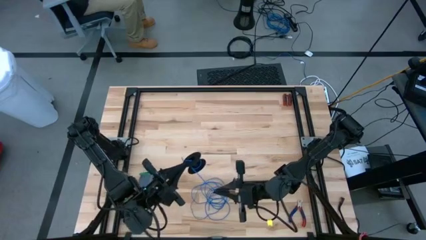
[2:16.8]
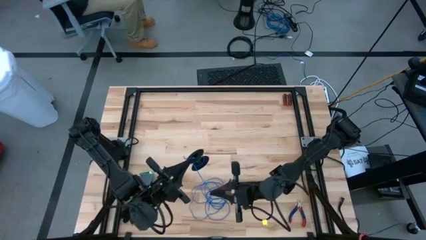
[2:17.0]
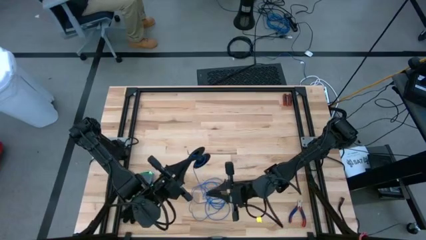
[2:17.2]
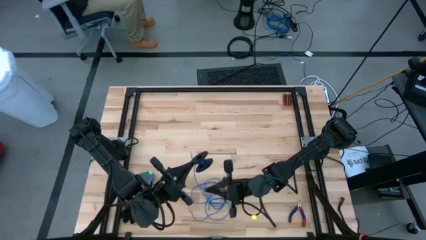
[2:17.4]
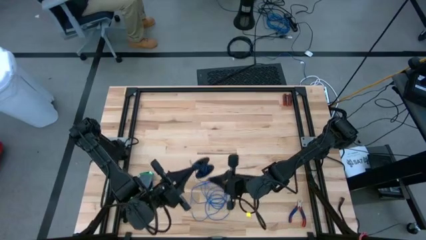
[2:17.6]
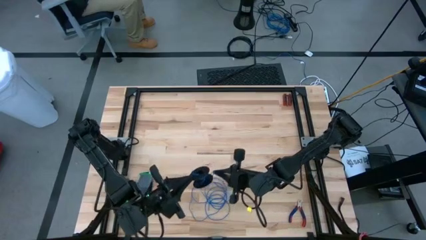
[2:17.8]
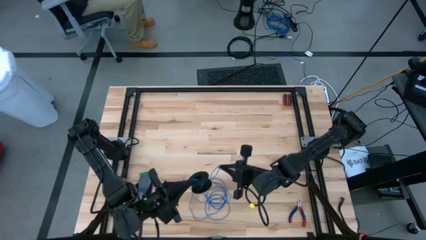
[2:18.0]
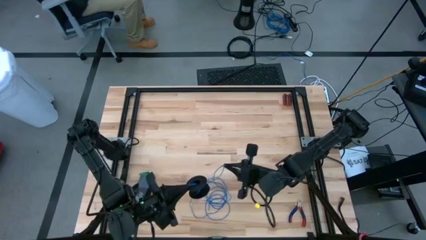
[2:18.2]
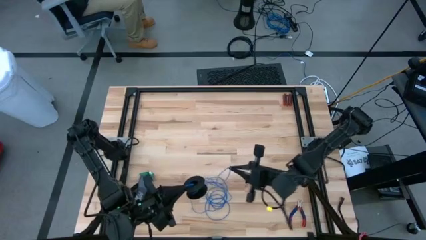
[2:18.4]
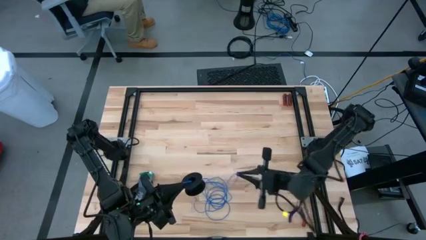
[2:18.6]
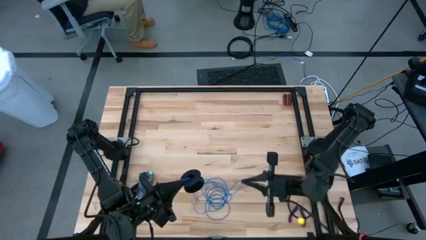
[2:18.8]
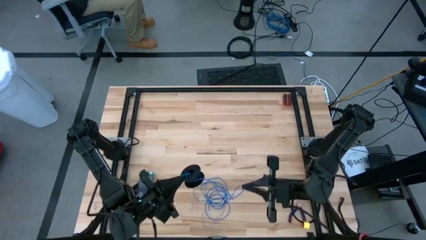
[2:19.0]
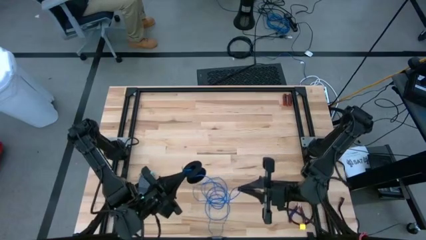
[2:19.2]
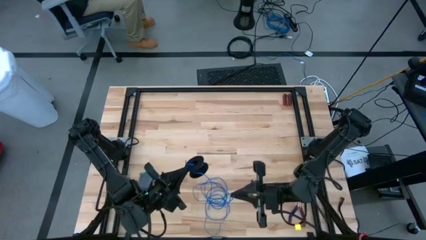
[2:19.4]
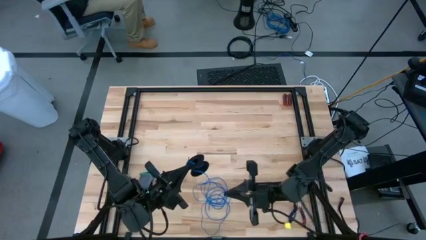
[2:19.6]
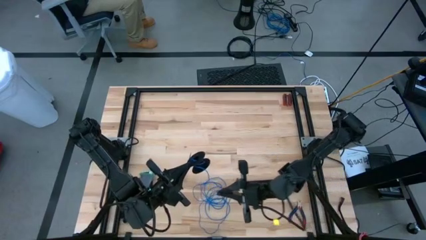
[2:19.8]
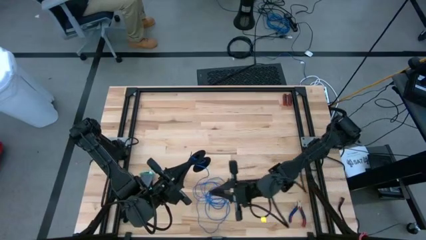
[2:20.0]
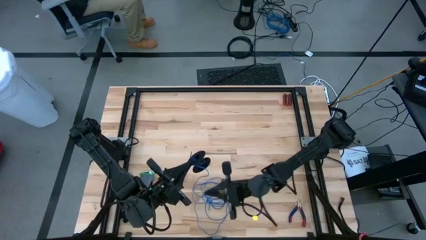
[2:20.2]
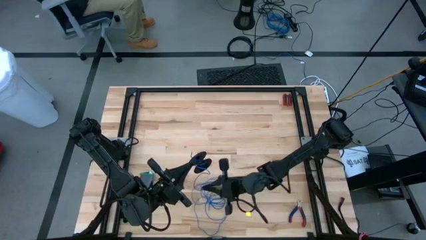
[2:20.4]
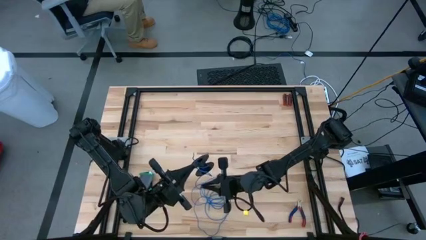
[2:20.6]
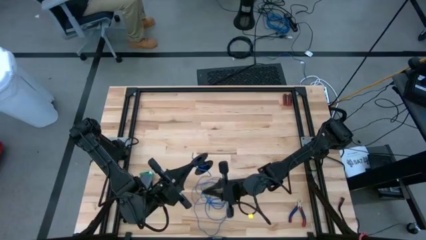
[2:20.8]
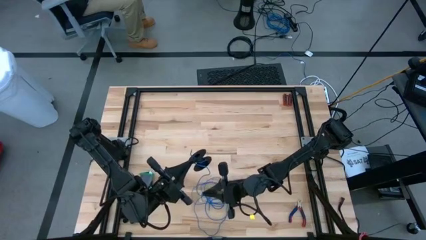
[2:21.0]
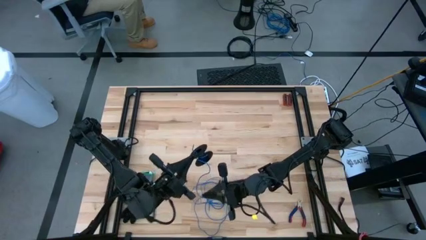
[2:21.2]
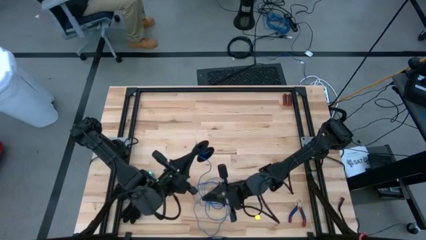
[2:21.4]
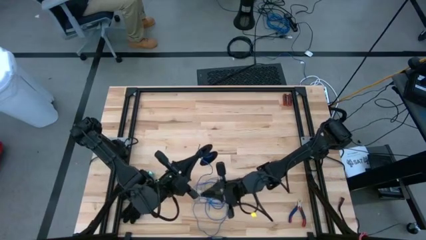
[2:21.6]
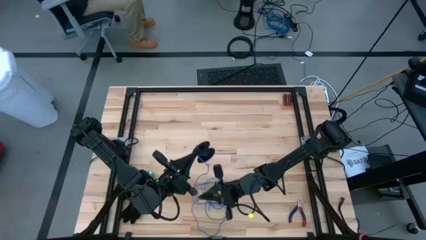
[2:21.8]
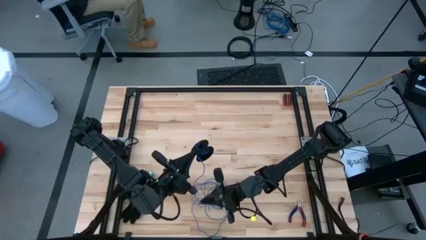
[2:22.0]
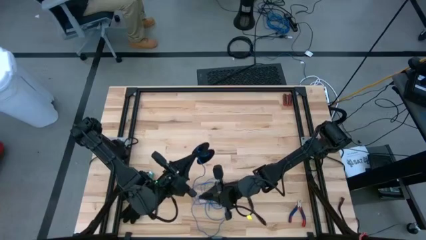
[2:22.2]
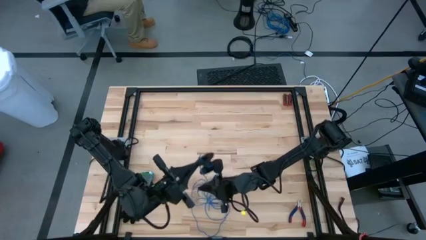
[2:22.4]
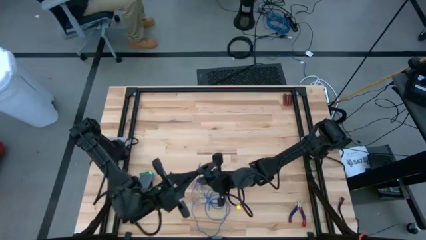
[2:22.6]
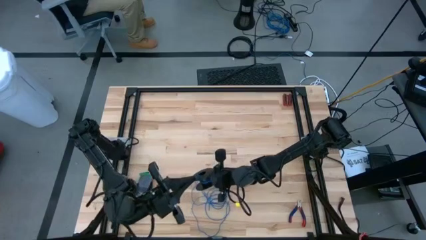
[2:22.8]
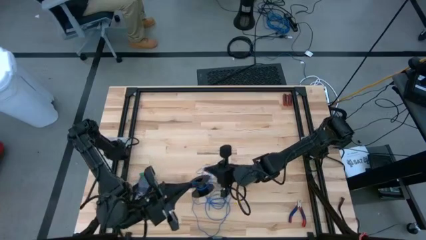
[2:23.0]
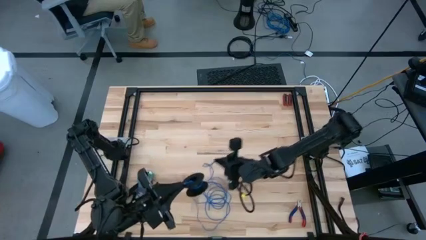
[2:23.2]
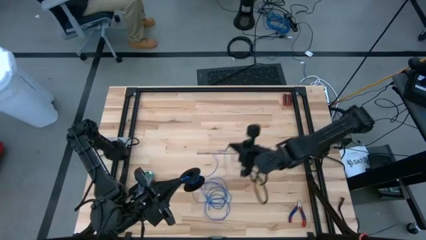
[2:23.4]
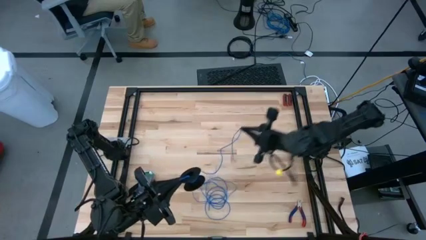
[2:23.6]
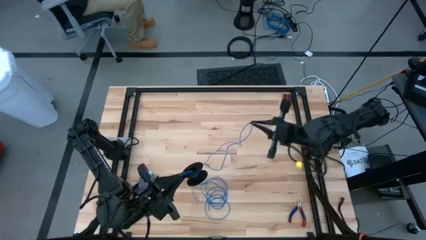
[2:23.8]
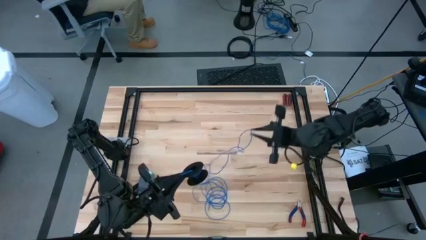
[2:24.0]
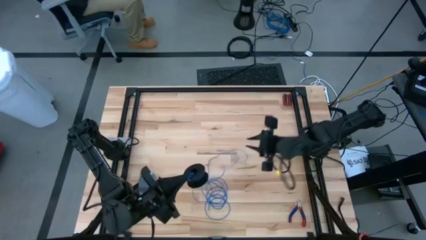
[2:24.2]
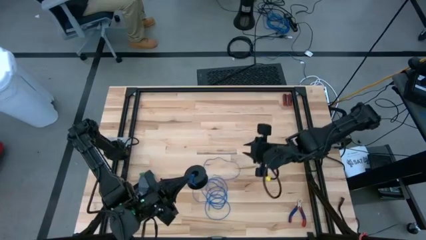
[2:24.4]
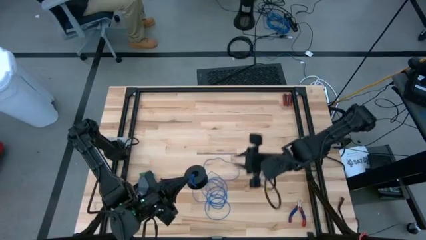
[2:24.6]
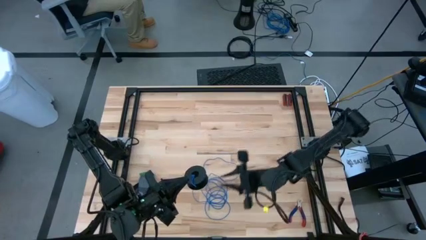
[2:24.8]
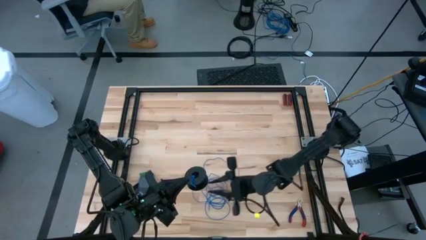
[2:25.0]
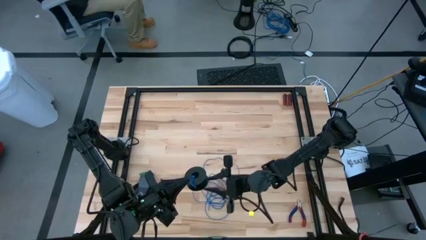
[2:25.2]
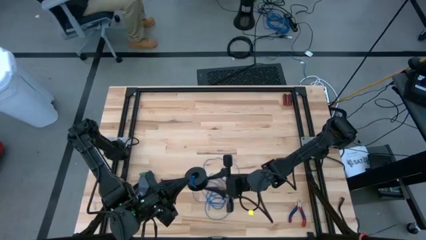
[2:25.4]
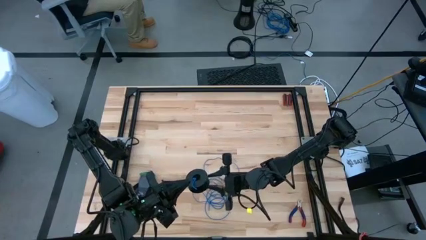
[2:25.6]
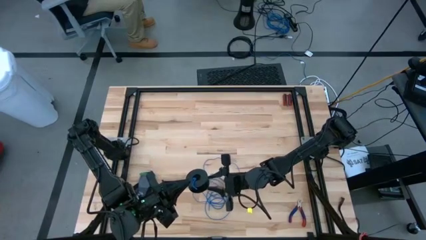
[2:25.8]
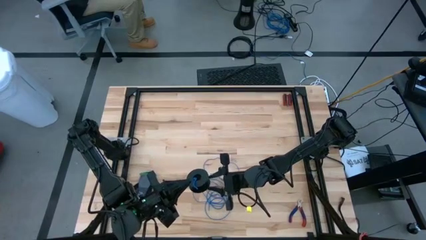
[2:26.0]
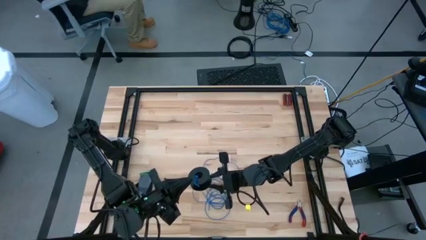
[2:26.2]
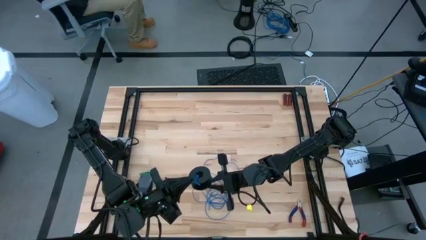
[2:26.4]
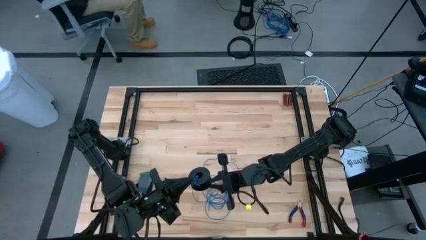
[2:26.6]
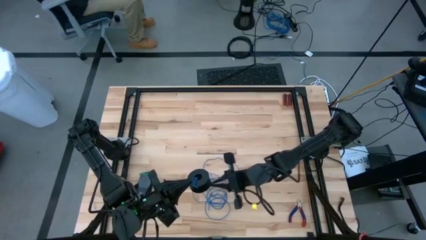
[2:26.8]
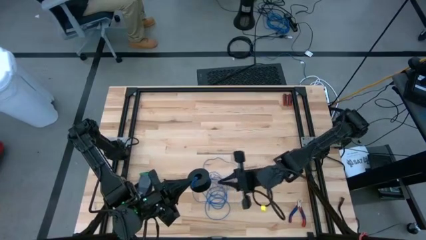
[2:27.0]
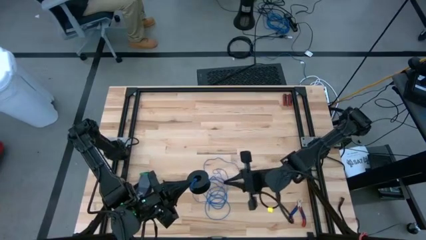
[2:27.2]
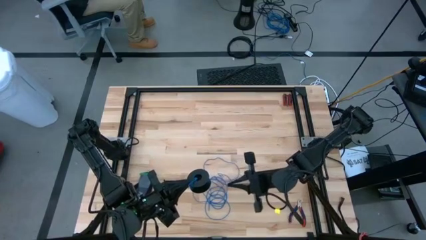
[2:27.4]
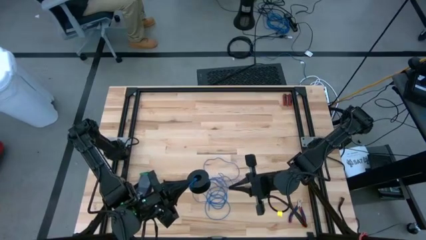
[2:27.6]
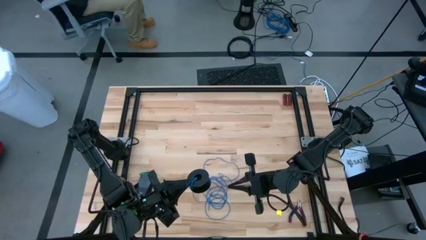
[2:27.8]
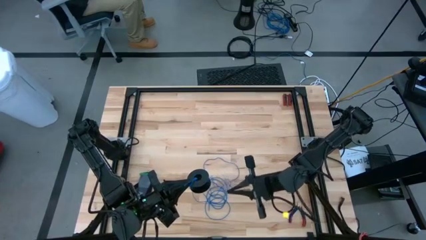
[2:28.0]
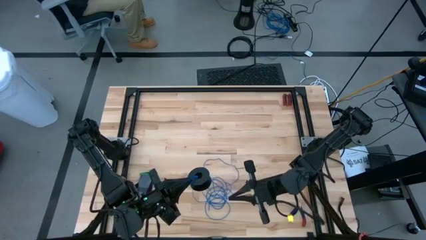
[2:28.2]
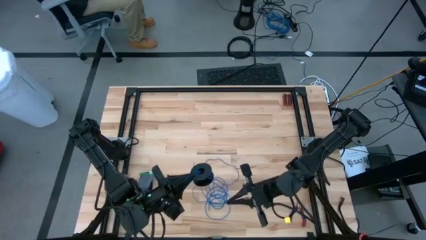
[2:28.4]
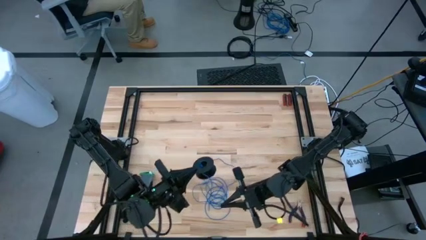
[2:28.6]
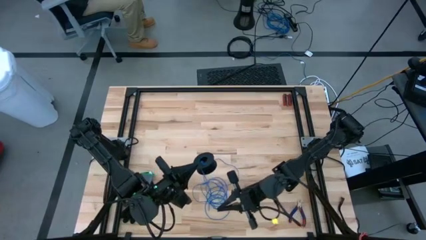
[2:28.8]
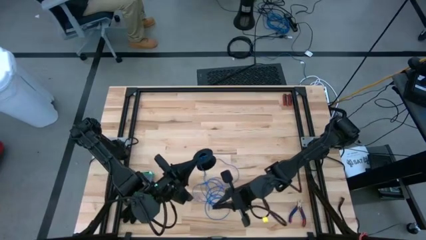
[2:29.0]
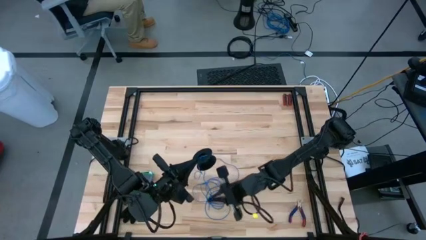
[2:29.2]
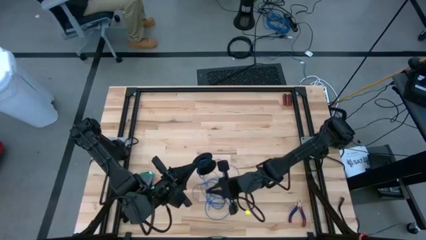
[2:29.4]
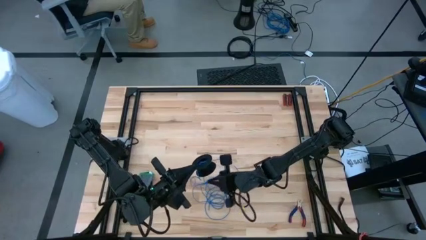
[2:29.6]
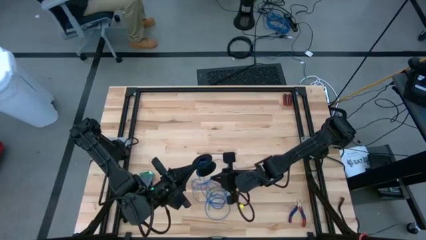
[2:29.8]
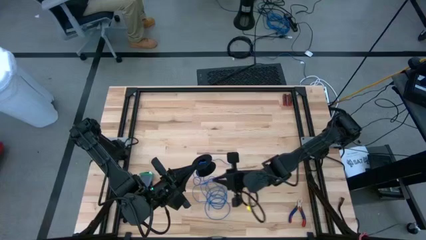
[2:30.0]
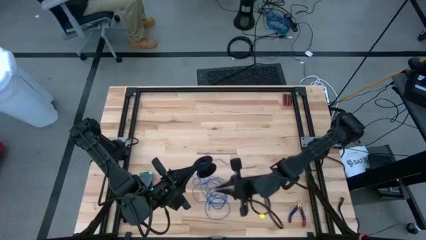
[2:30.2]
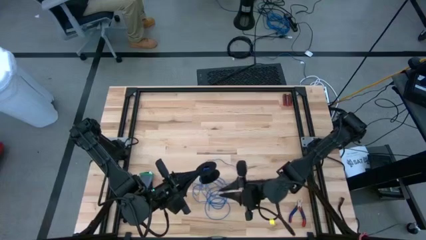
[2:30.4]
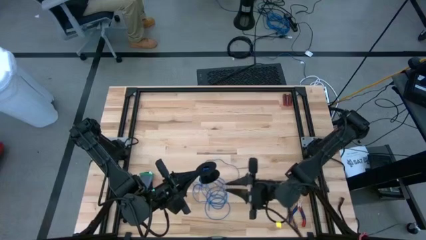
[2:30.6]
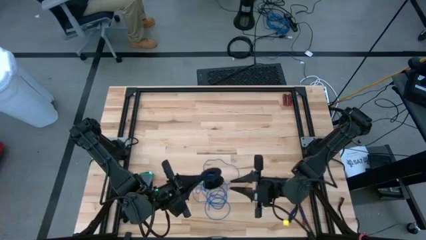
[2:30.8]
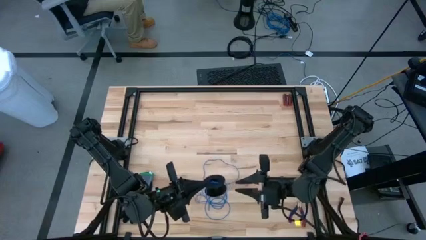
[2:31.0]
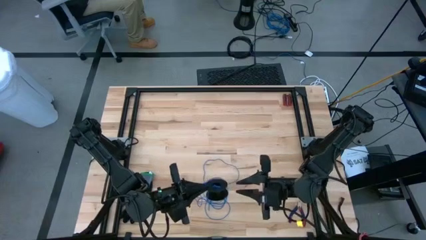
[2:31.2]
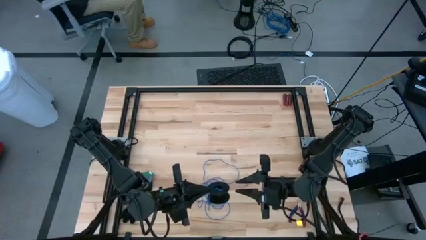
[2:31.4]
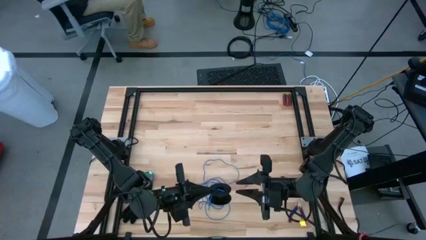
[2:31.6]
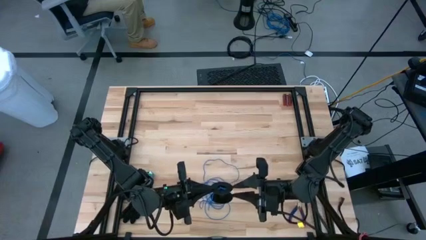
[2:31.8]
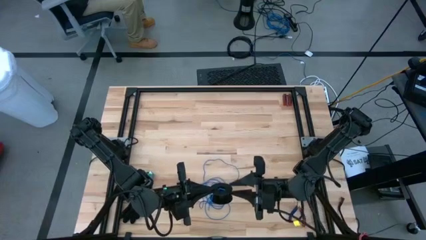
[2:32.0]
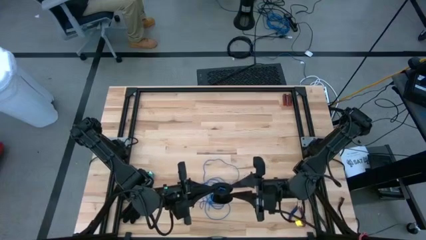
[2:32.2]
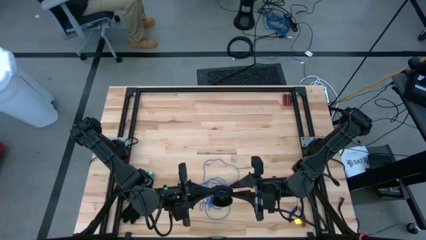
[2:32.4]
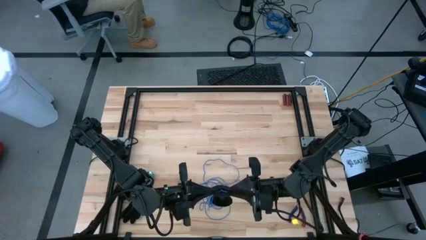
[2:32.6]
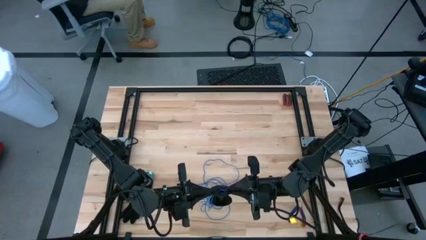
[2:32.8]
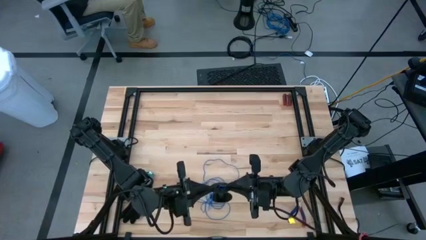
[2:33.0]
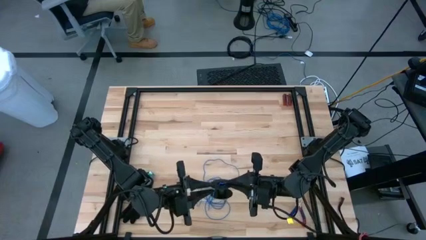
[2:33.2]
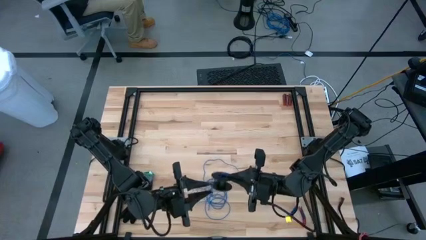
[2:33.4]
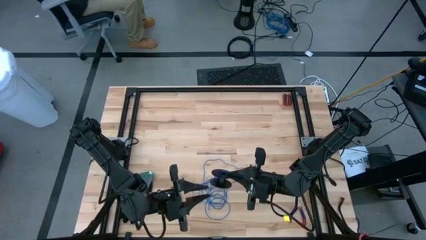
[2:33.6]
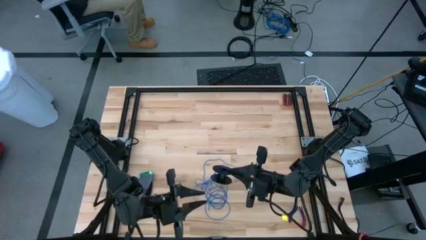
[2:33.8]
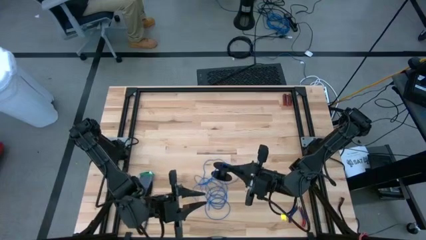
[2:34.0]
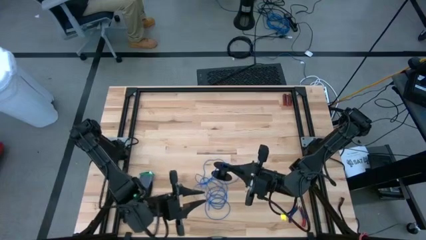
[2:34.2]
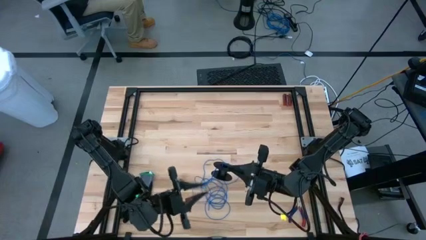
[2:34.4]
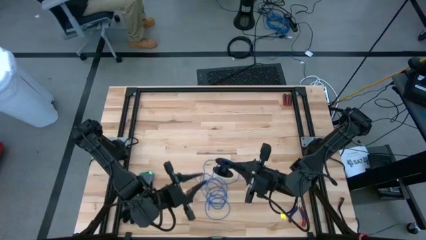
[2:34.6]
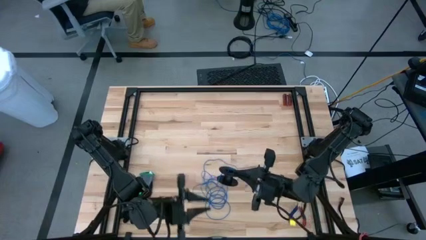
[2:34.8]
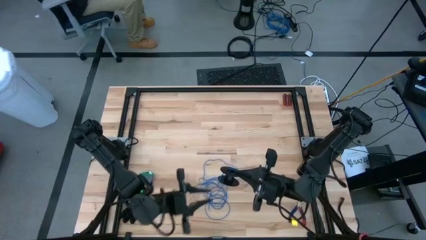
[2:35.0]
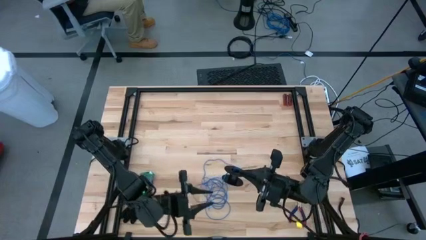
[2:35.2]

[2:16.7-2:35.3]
Task: Coil cords
Uncoil the blue wire from the spool
